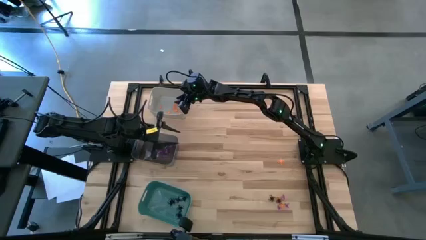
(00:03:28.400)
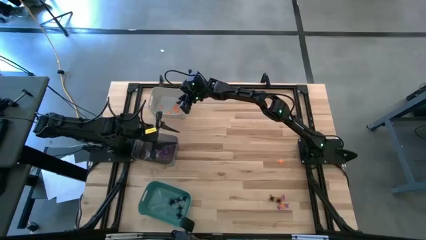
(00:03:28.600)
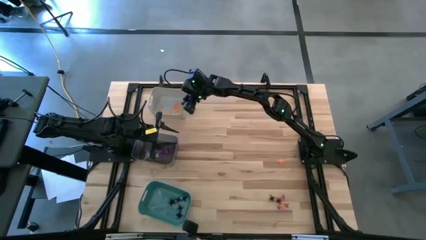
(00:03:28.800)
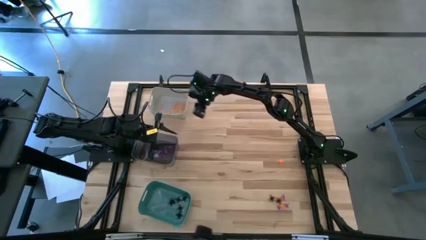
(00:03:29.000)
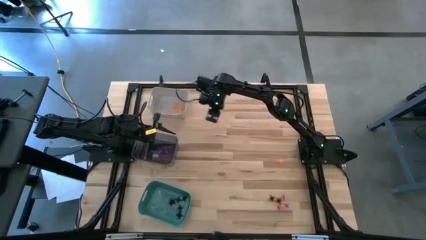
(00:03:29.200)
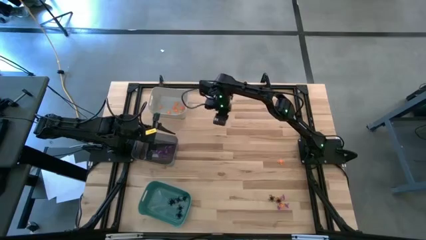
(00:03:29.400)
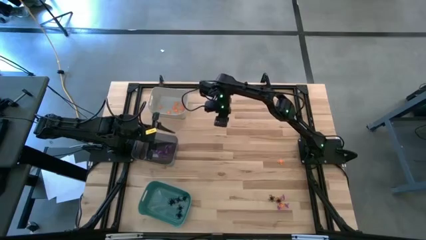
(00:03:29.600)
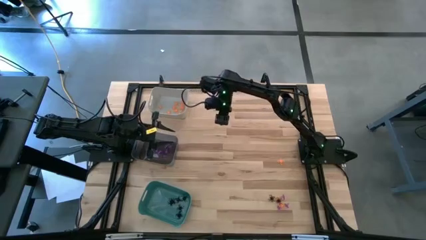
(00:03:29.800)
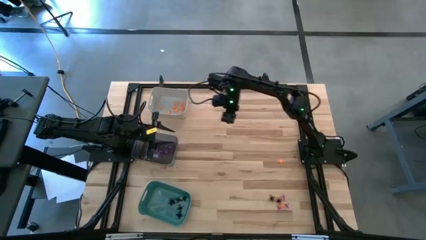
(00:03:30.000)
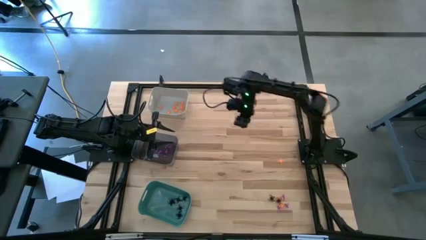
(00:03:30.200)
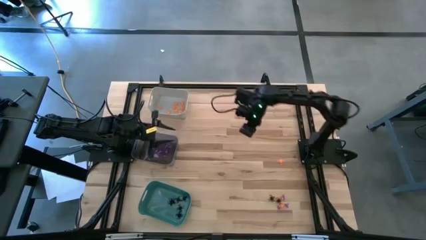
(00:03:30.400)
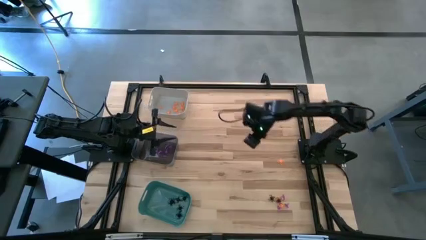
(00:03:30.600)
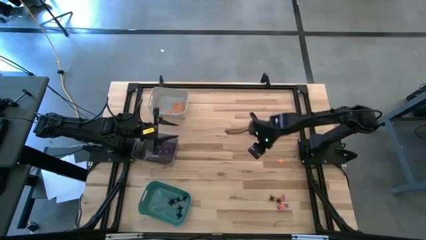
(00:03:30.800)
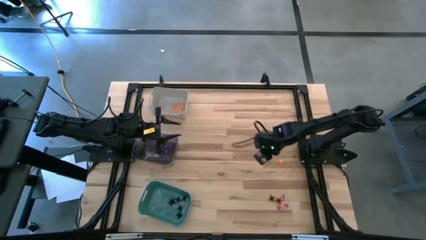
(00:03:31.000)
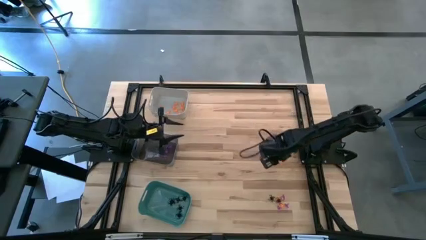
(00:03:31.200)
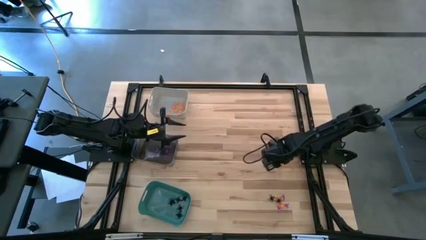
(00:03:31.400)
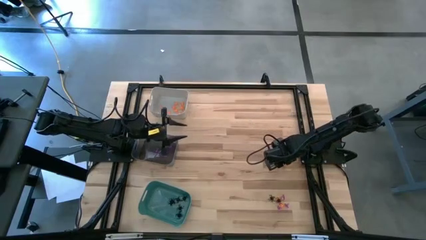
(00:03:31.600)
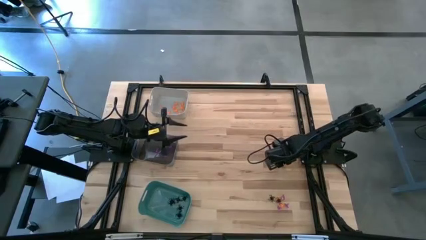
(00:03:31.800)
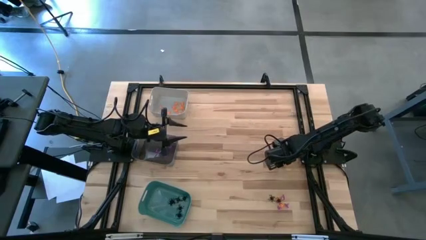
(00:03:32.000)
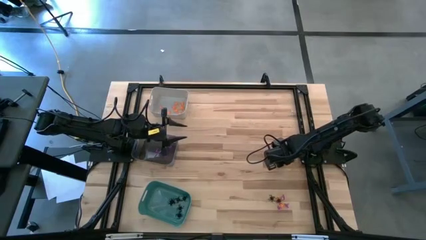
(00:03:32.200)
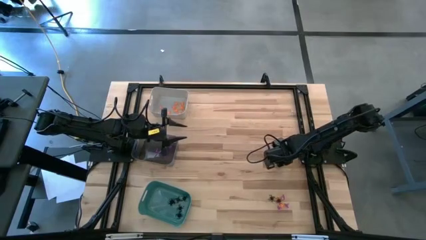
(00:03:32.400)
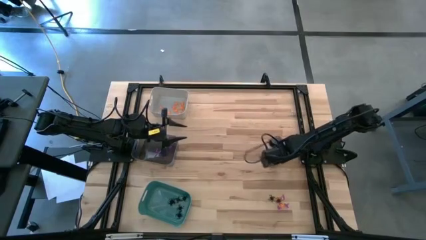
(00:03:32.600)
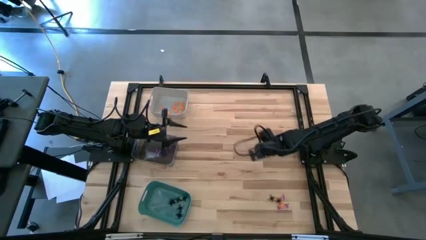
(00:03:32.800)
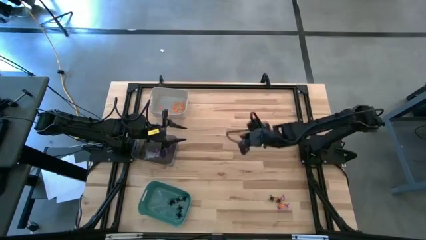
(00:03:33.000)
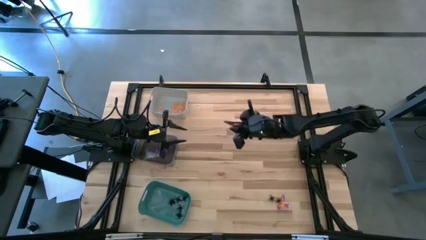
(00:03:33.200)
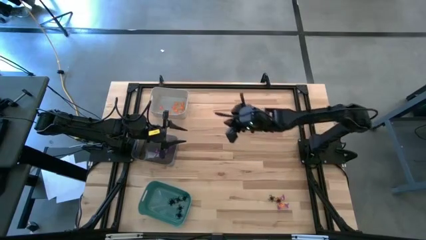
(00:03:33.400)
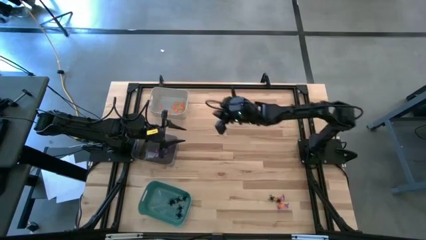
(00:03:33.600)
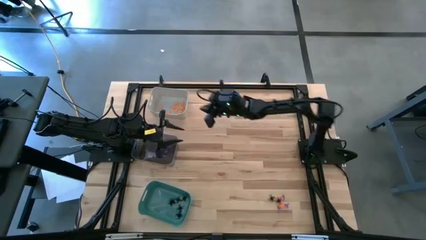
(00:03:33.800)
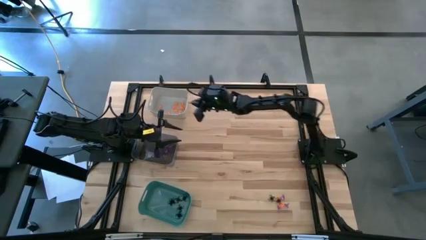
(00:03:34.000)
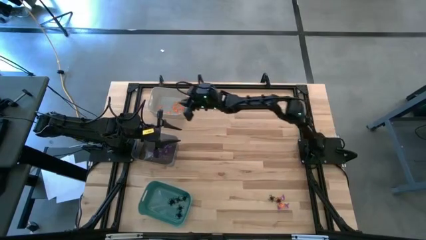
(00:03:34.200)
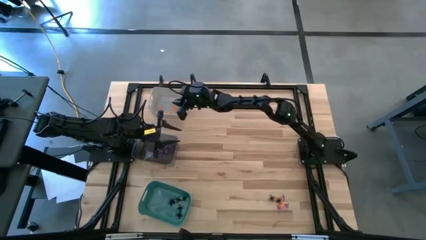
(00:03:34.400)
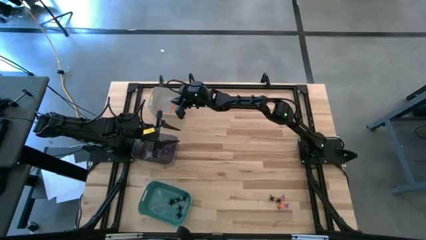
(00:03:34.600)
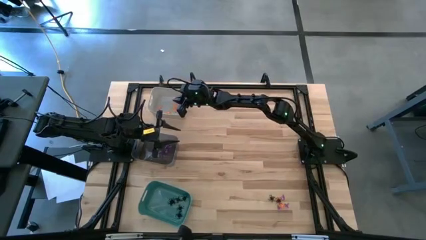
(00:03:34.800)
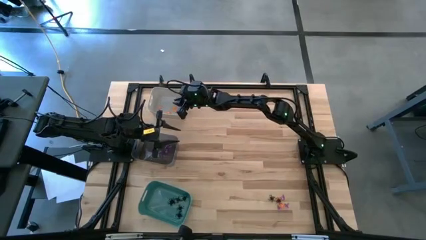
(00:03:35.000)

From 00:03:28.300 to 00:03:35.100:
Task: Sort Halloween decoration
Put the middle right orange spider into the gray bin

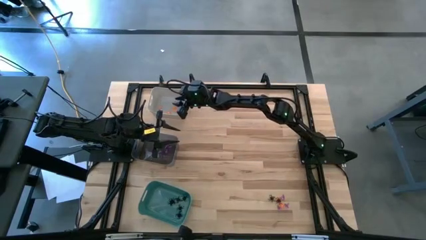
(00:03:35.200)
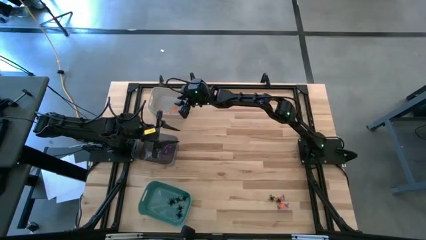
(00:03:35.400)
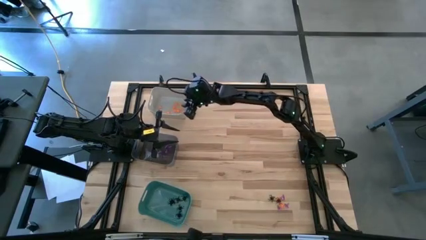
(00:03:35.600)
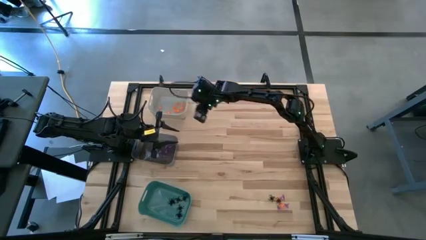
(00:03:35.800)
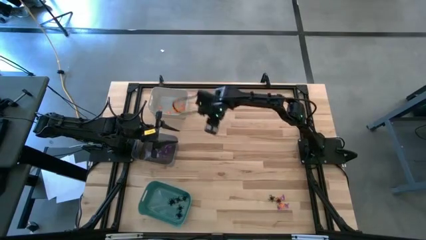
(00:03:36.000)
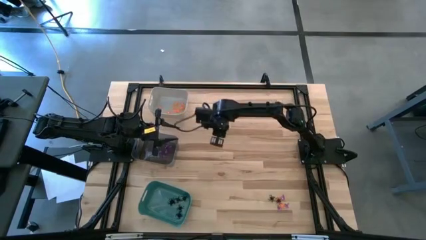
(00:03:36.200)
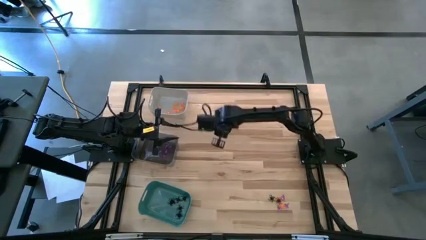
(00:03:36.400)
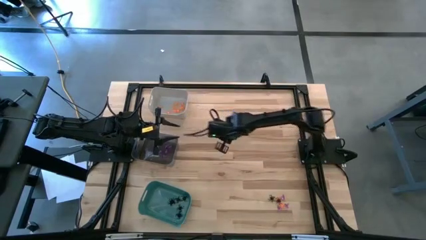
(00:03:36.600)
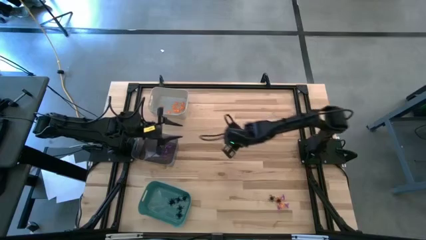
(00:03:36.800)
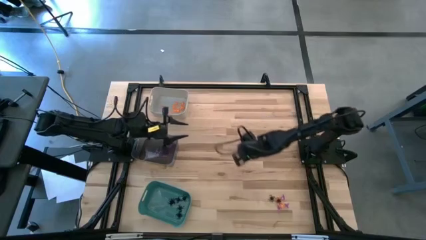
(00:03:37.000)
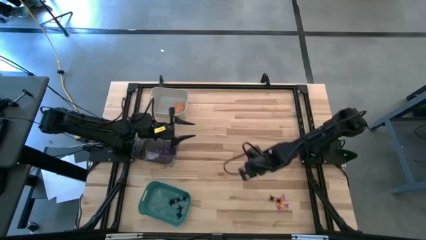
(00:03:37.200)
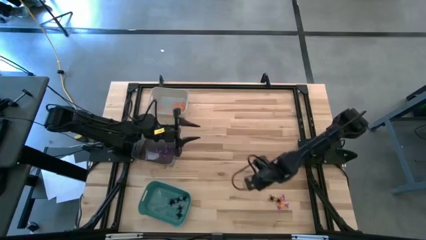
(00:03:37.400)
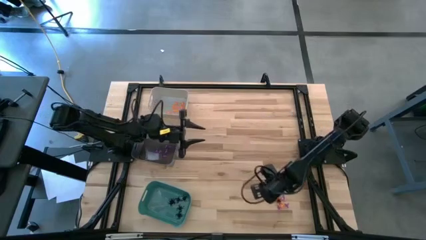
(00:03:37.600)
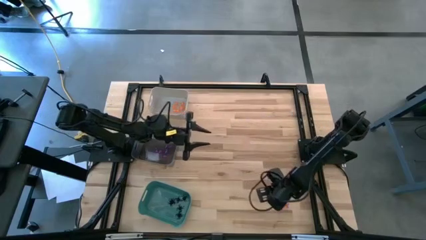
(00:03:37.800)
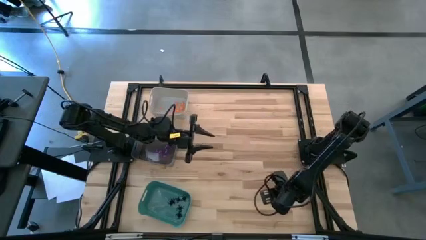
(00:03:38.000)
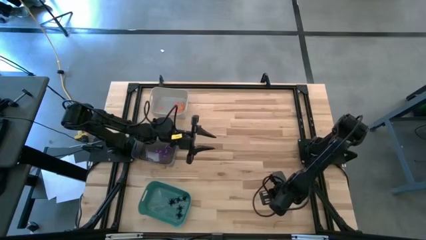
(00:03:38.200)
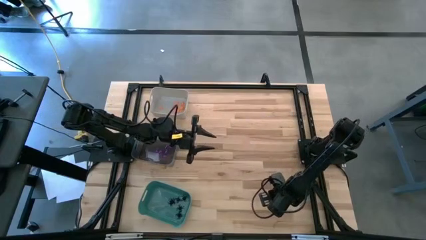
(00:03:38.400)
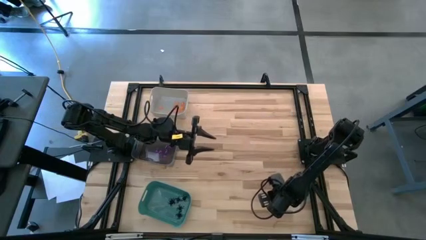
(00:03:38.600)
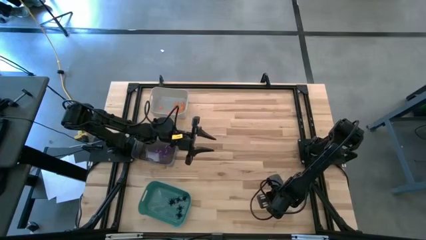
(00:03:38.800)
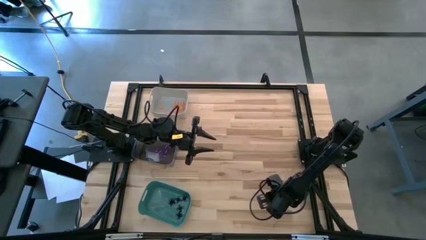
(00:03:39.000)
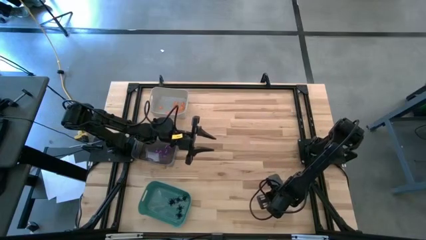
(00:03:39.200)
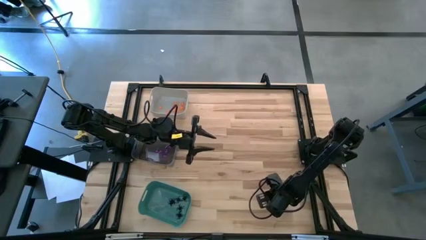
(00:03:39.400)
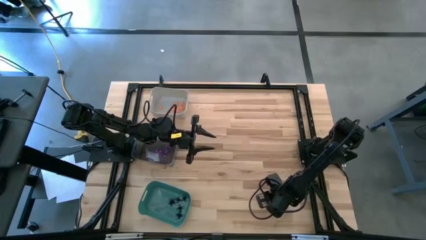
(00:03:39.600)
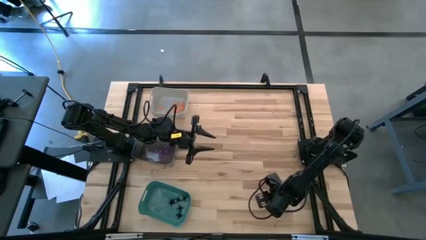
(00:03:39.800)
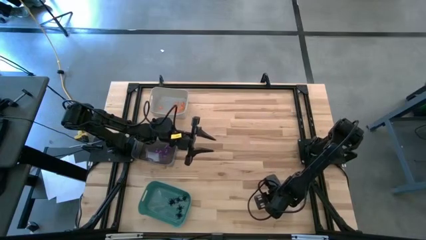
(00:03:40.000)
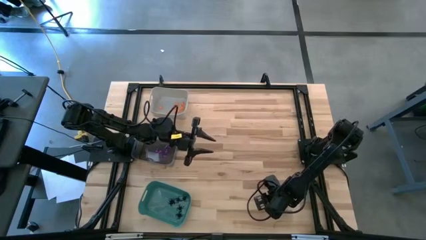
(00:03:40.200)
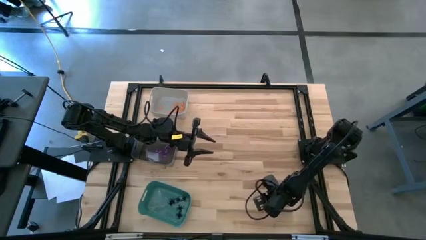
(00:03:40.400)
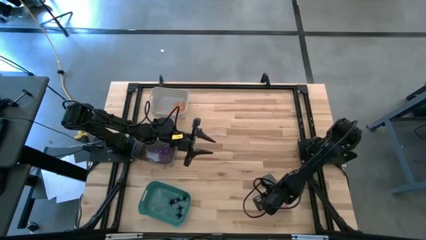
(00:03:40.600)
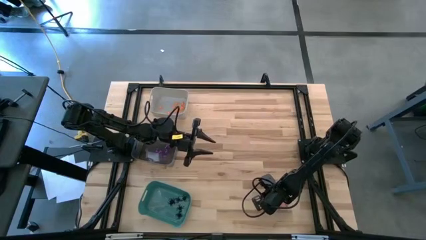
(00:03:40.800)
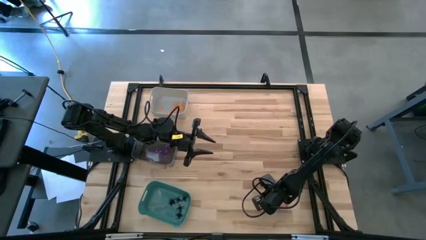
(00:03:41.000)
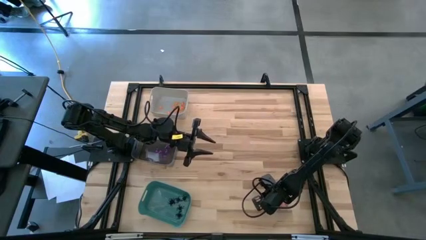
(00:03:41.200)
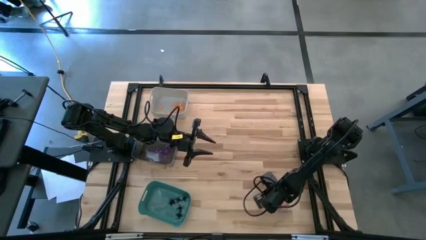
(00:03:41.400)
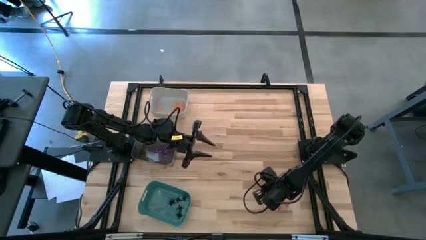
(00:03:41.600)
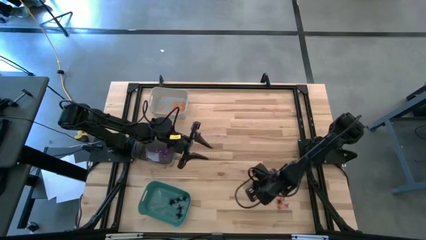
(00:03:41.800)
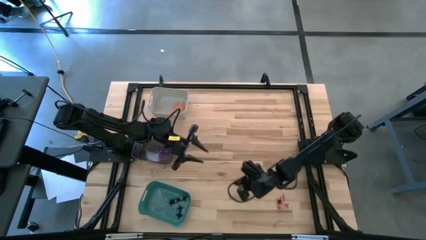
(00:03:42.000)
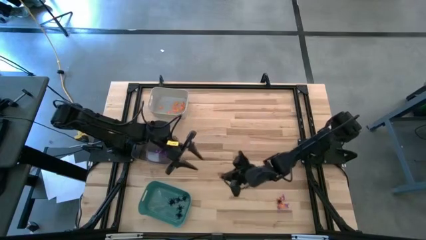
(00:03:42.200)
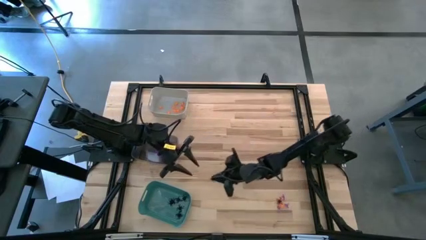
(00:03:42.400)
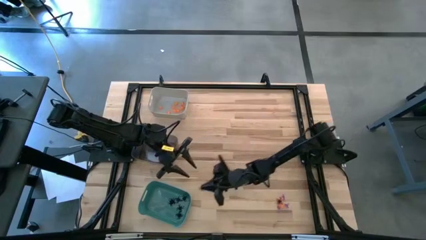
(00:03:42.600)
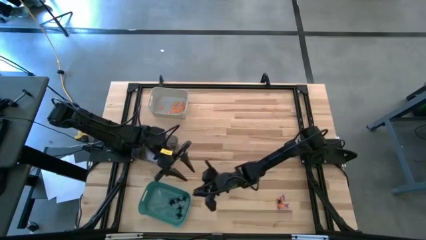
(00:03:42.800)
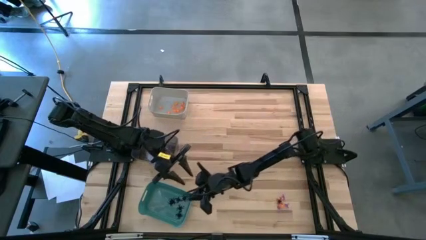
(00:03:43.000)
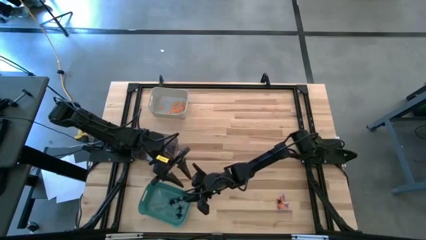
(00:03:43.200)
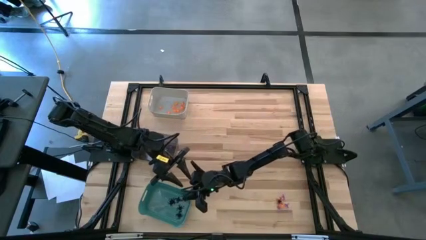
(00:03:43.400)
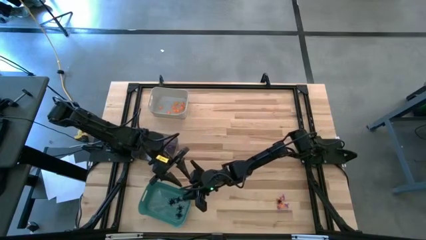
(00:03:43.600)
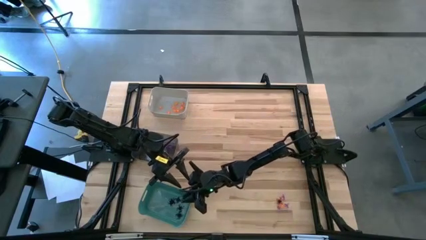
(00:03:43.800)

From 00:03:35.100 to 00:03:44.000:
Put the top black spider into the green bin
